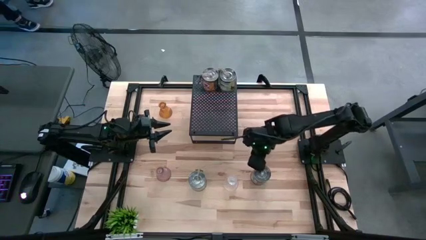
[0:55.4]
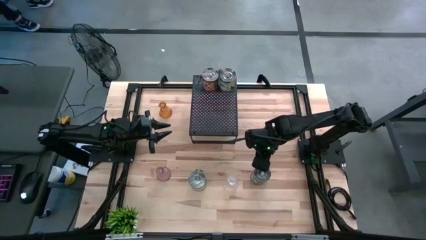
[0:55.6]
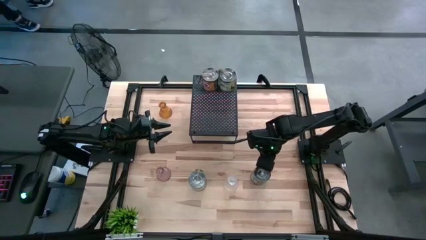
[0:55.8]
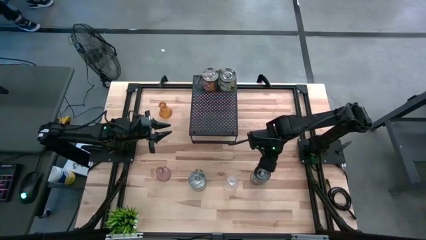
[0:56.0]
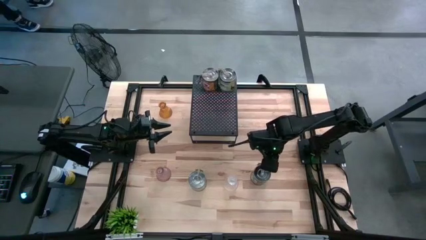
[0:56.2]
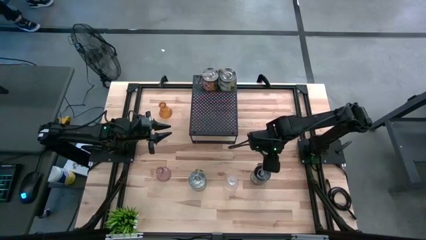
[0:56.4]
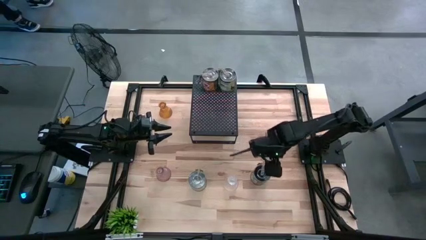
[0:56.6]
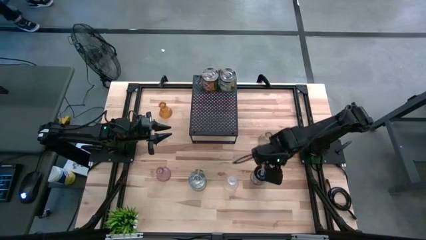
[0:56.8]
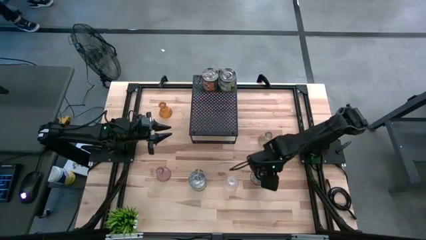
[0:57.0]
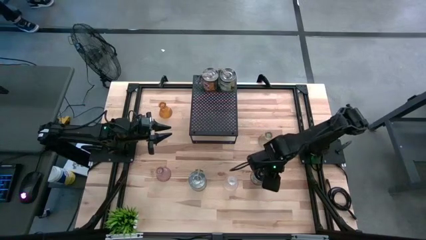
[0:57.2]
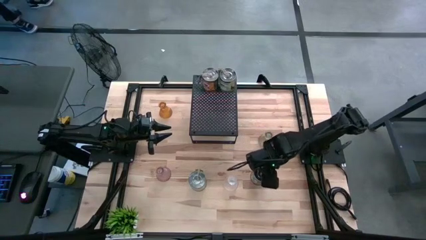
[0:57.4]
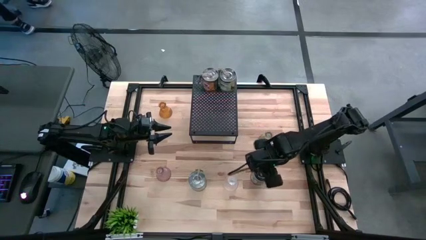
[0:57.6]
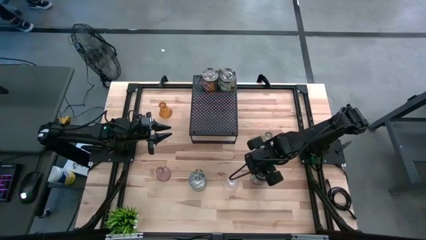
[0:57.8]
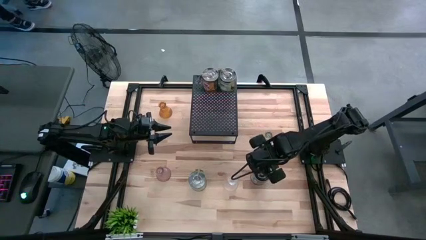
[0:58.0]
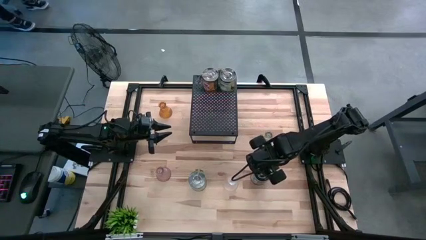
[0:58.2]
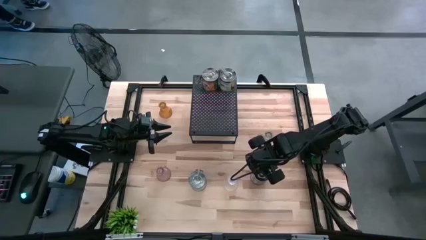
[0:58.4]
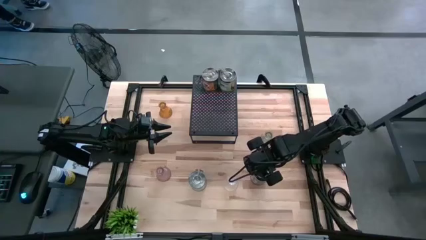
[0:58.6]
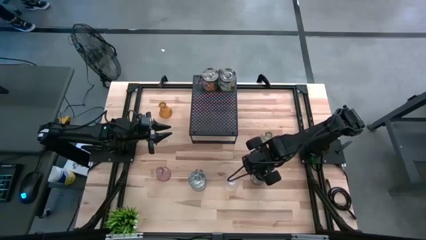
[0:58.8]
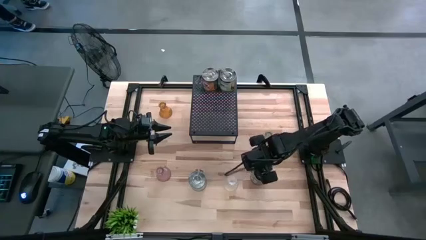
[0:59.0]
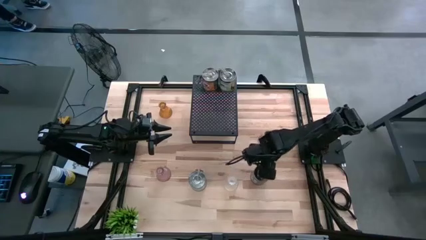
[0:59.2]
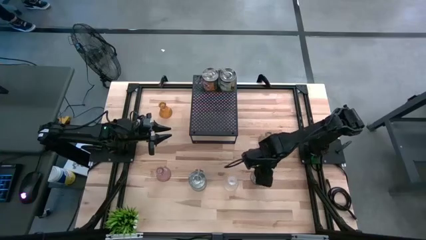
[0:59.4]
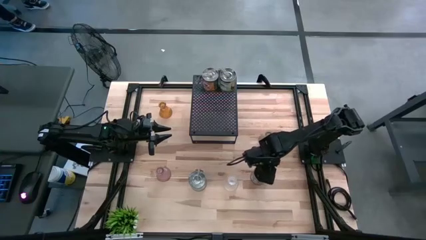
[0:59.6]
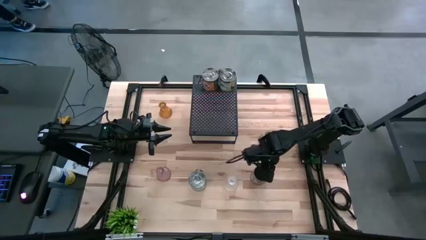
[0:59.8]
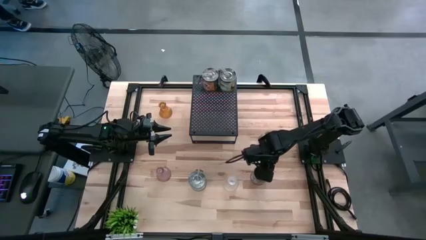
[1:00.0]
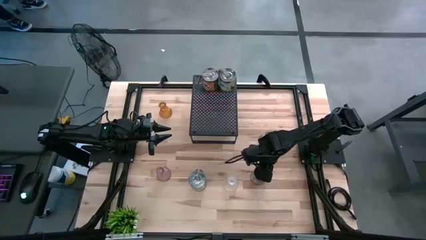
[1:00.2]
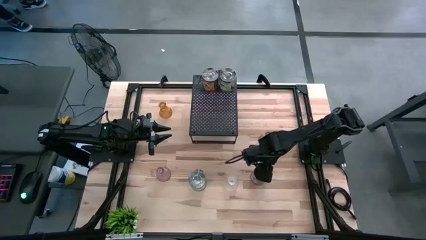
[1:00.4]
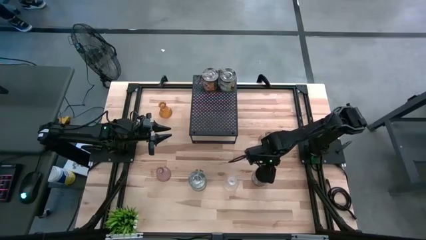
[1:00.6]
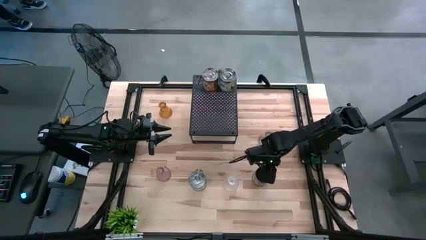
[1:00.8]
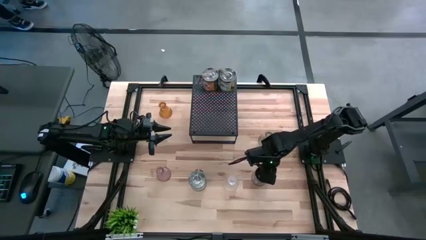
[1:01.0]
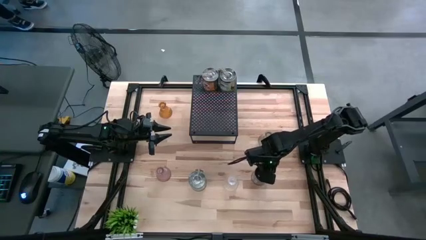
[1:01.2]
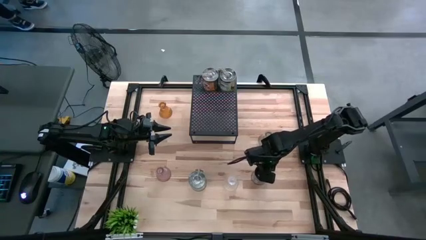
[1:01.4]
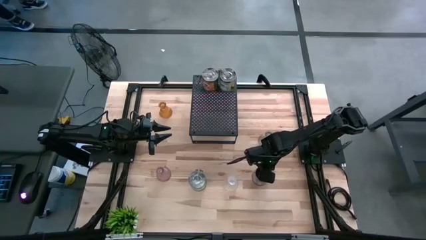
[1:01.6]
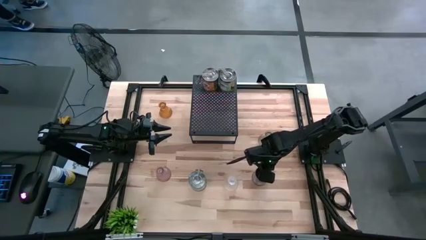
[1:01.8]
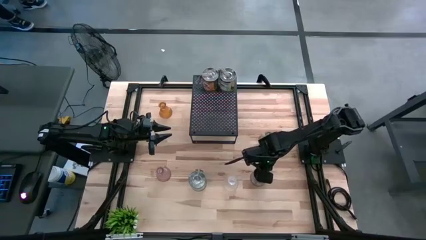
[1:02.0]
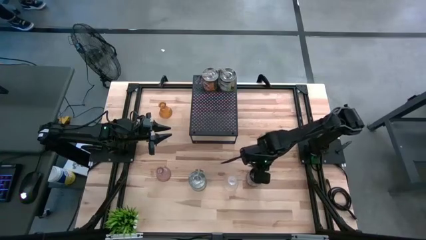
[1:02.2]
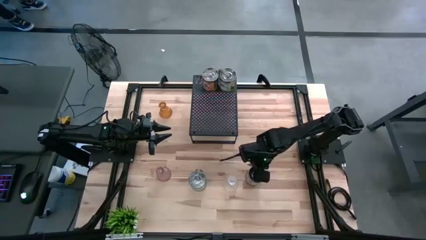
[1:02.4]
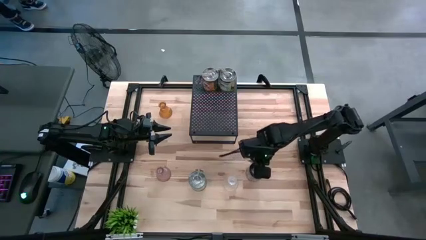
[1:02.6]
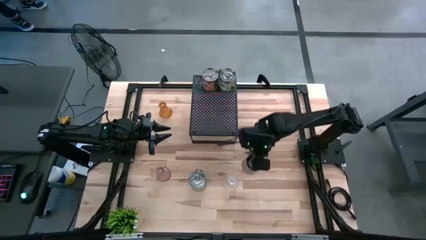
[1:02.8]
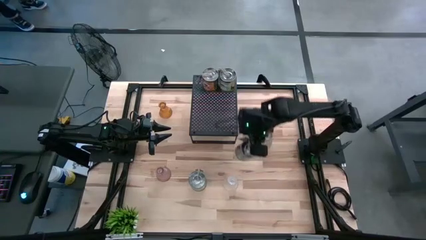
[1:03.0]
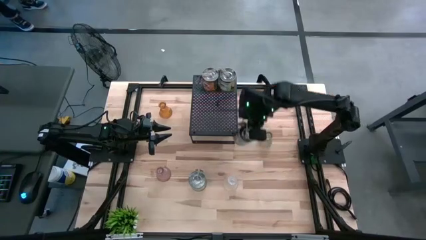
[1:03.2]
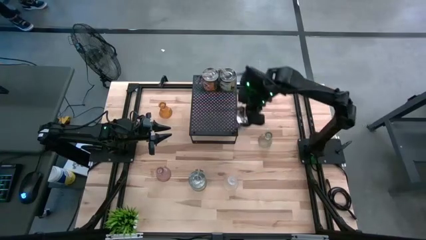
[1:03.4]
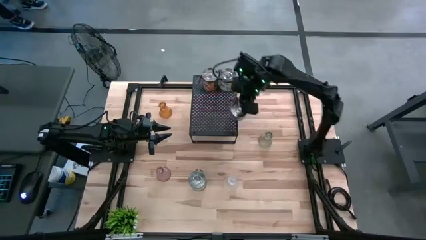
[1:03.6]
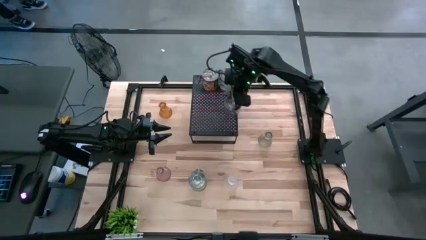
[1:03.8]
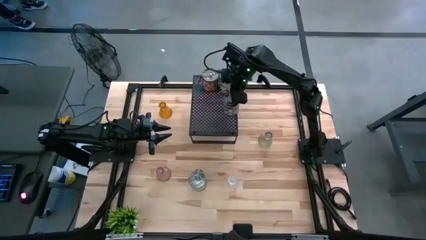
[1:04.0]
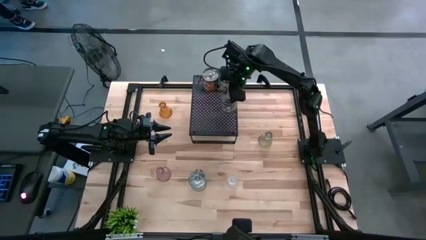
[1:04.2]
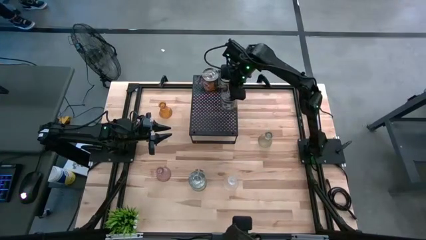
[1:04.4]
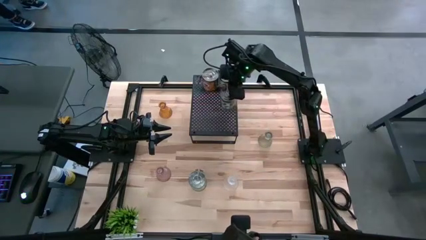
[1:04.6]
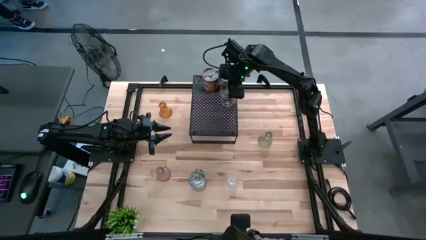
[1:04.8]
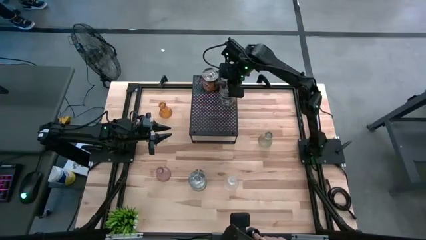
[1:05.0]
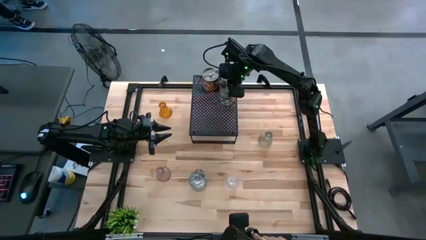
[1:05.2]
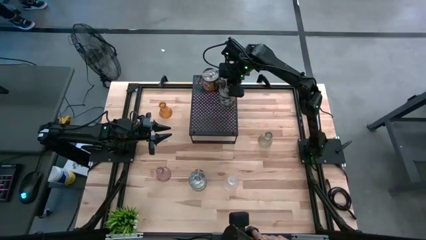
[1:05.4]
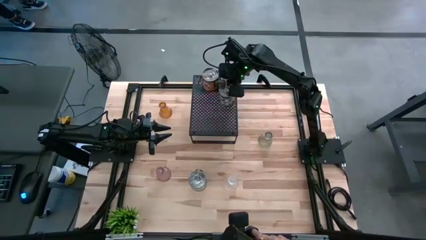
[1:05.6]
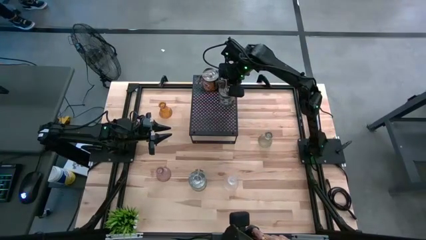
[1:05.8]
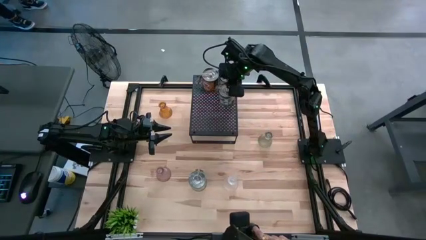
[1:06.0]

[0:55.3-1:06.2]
Task: Pick & Place candle stick holders
Align the silver scented candle with the silver scented candle on the black shelf

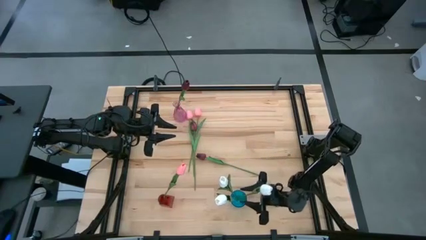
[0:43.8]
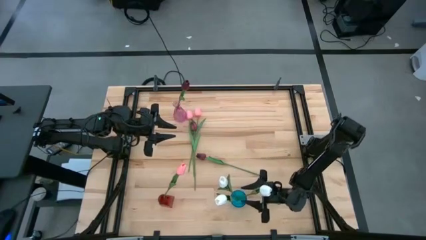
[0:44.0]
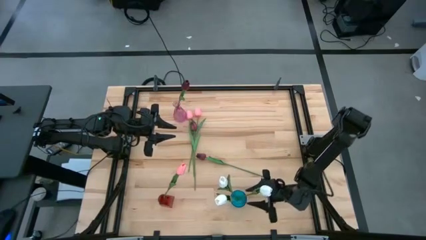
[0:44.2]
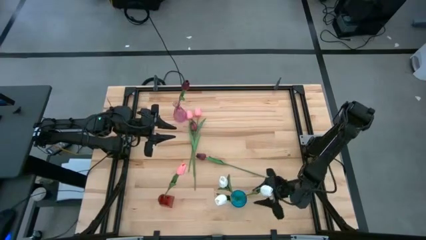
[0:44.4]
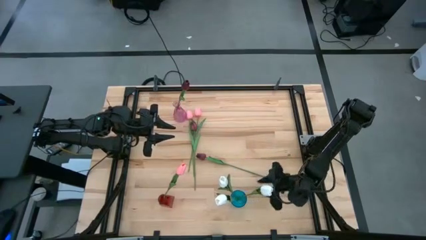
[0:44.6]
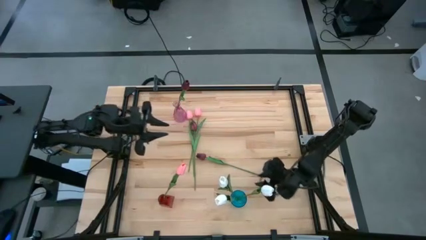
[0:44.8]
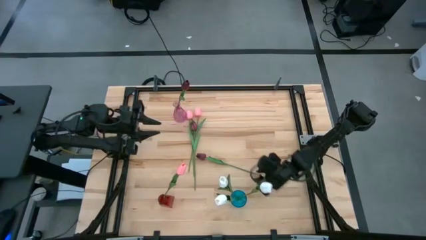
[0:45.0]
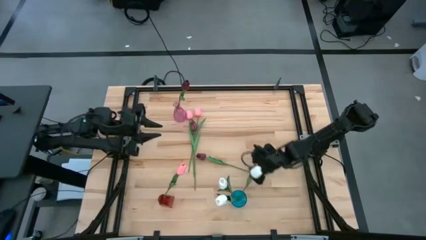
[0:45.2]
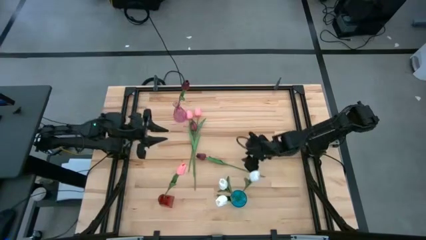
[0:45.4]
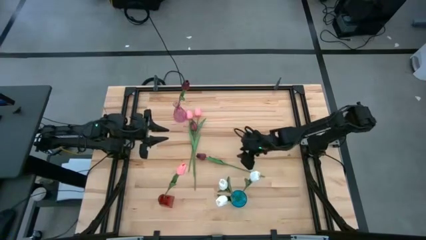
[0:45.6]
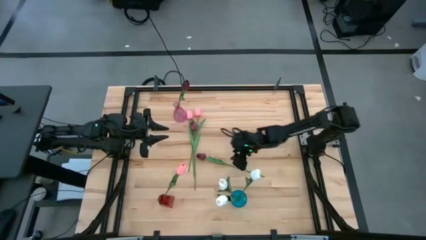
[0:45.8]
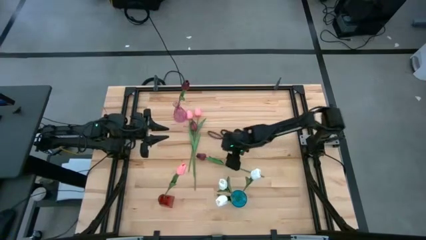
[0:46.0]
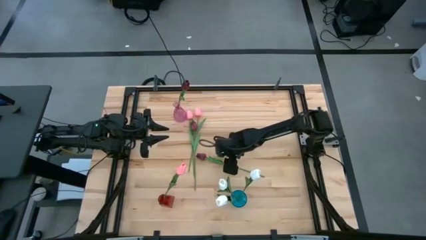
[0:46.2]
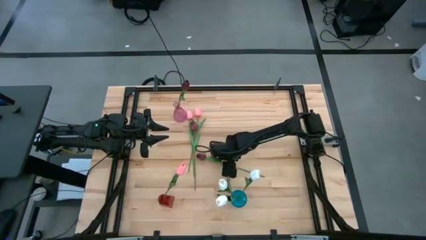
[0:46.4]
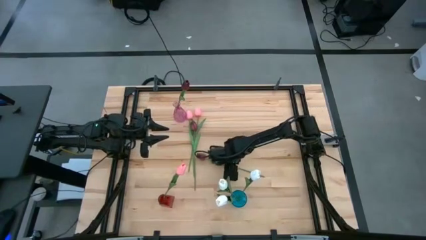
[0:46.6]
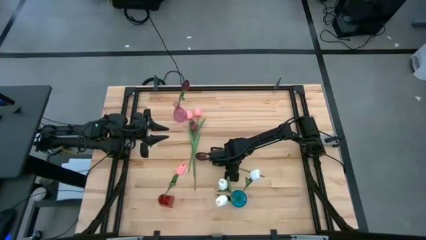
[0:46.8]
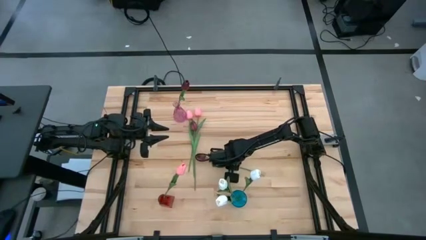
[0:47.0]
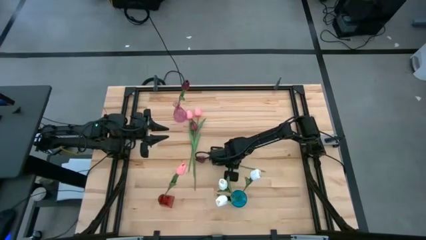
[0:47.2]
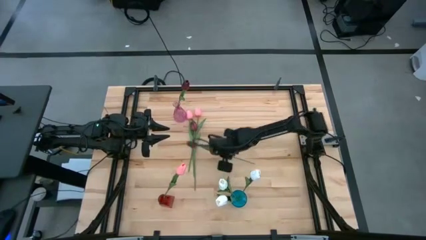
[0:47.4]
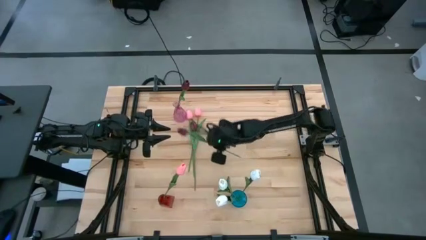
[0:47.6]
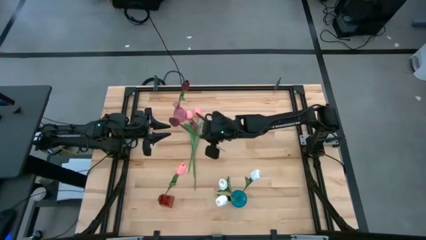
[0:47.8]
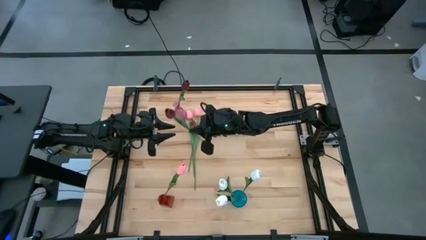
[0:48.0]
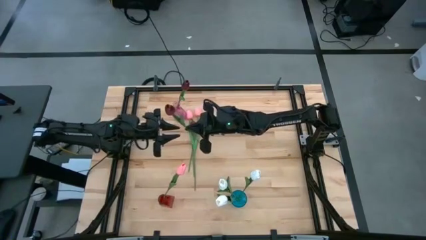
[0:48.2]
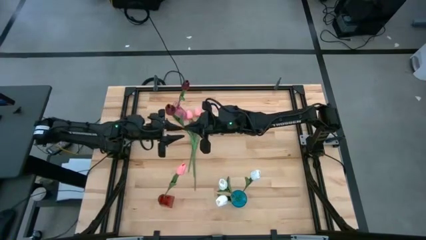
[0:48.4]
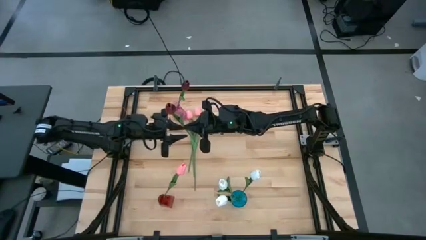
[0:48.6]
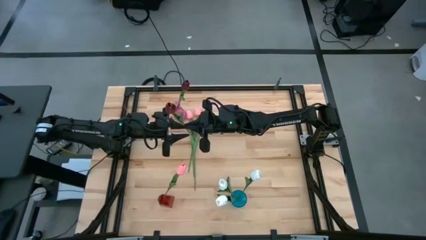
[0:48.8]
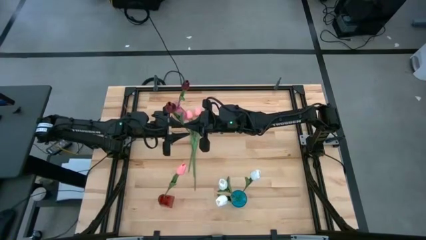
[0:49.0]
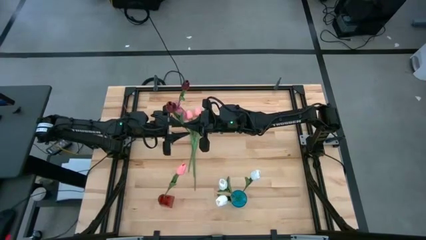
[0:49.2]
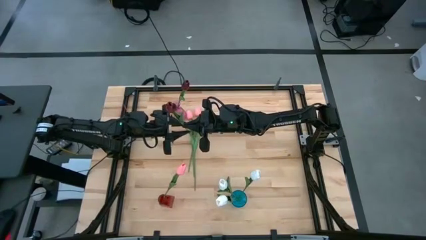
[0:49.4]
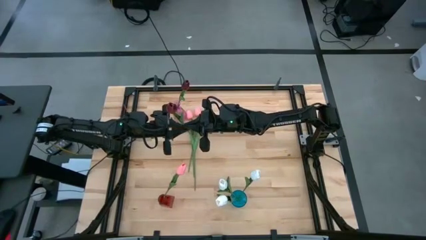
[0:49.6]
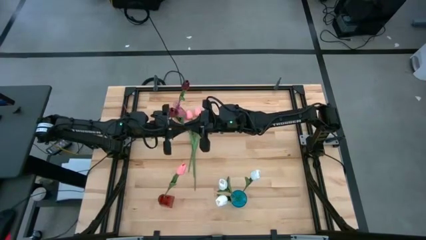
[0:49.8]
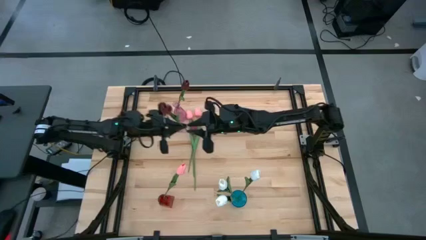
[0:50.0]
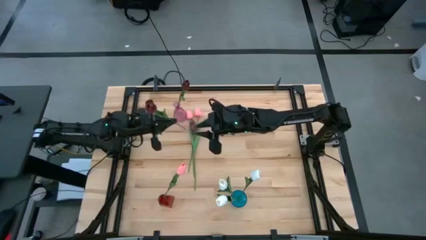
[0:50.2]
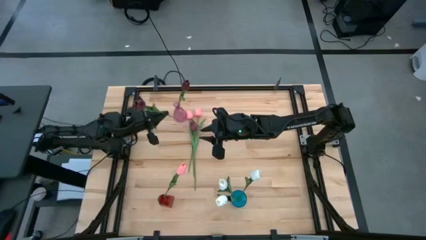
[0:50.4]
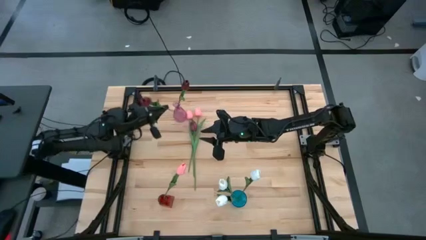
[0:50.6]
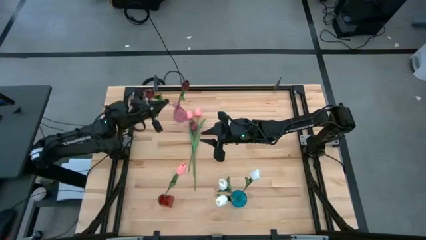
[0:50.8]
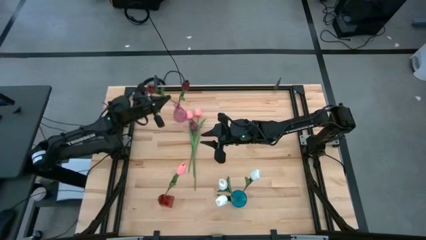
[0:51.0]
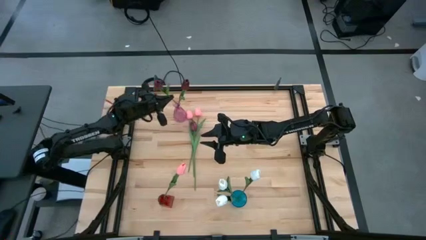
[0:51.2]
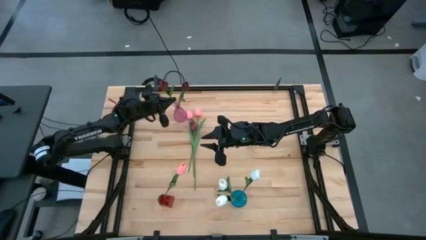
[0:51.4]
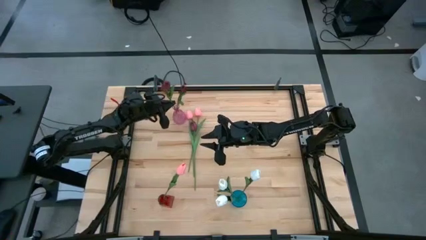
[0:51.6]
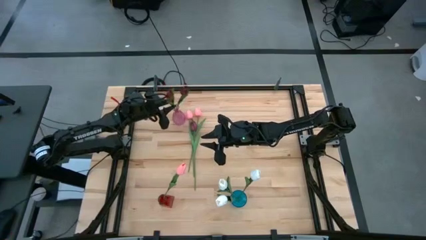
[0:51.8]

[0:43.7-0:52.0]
Task: Sort flowers into vase by color
Put the bottom red flower into the purple vase
